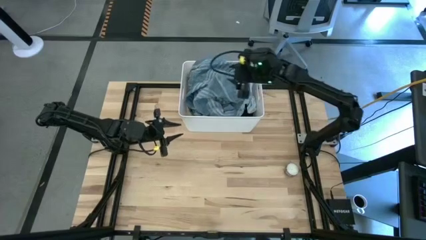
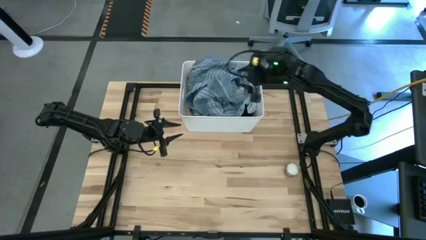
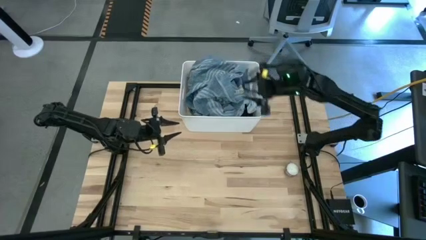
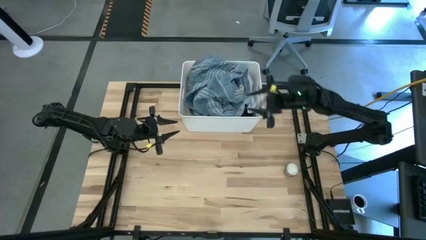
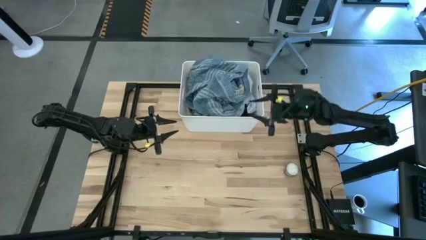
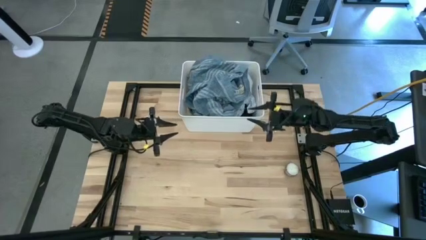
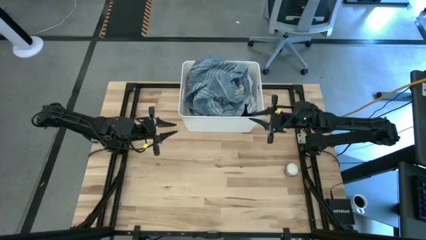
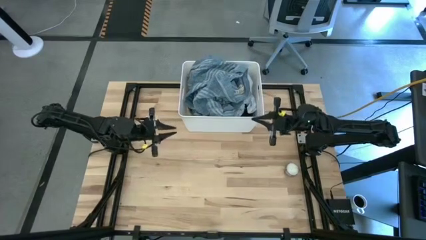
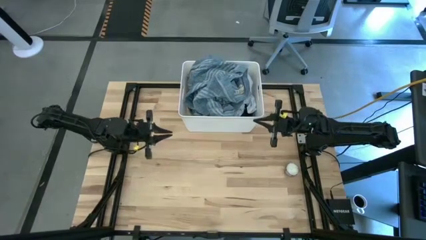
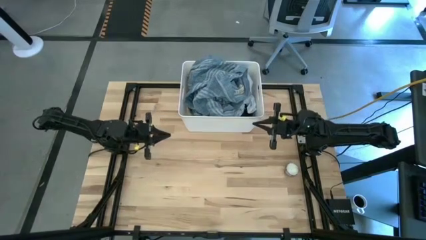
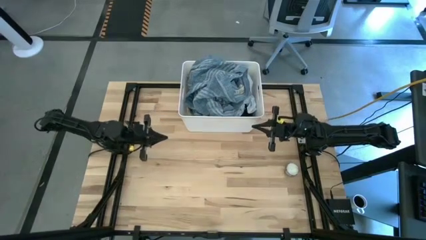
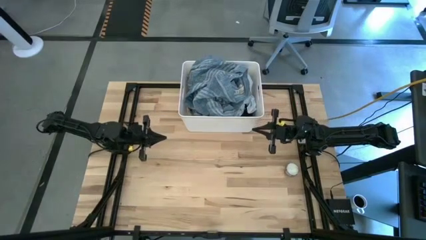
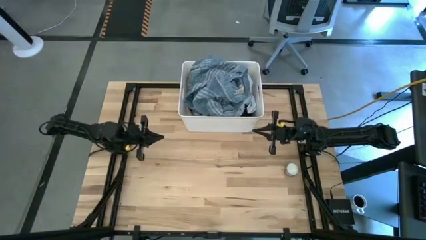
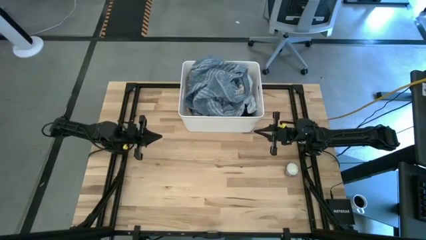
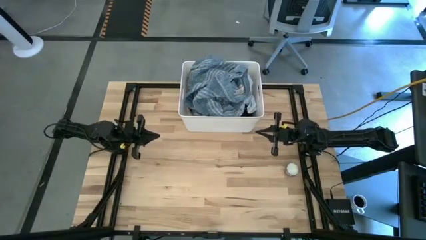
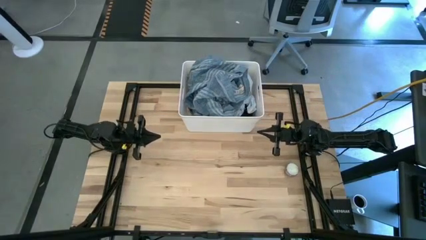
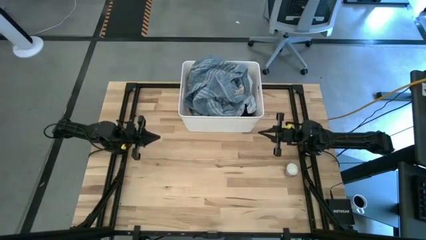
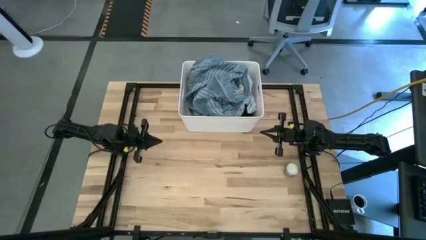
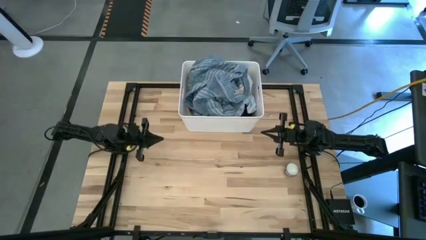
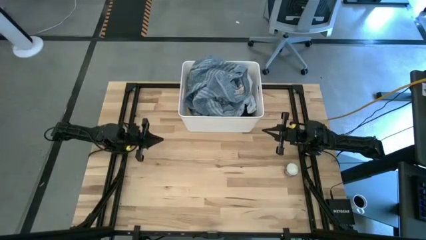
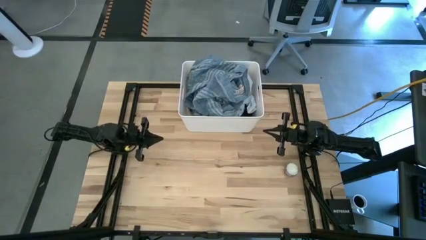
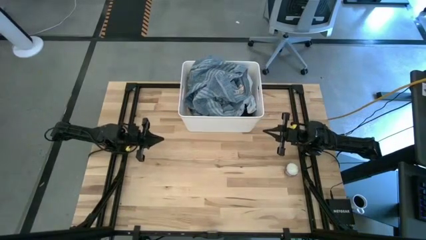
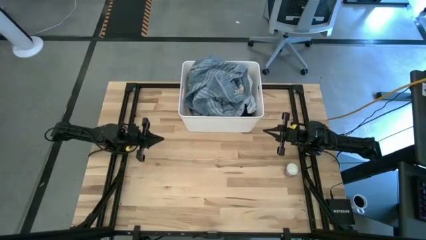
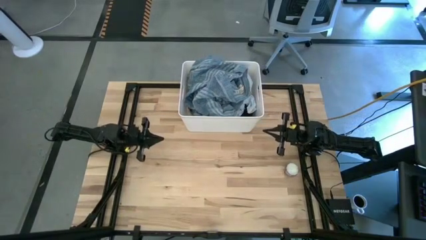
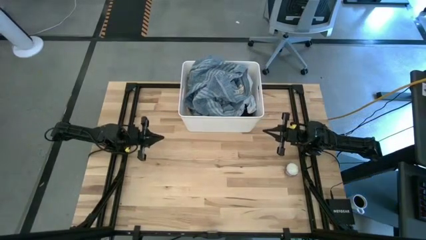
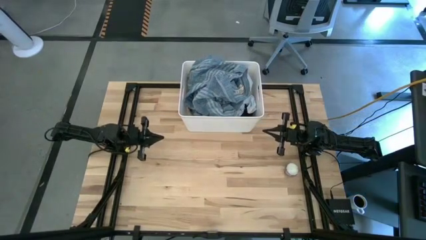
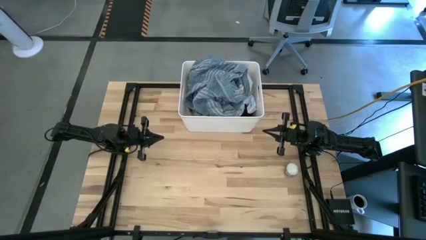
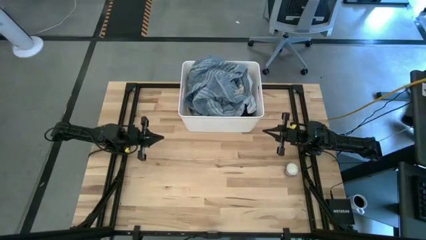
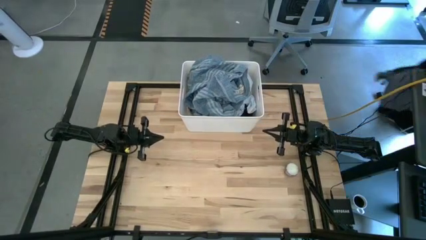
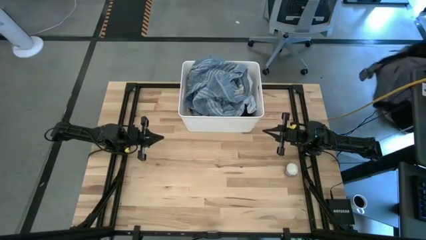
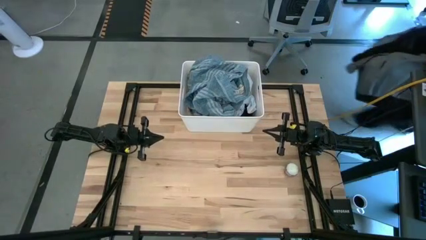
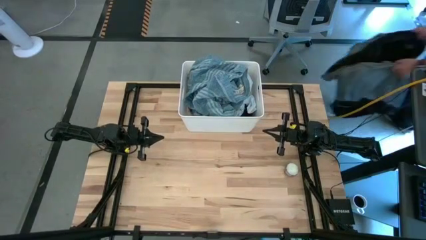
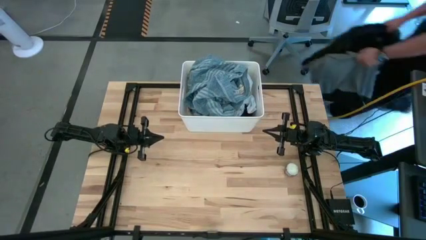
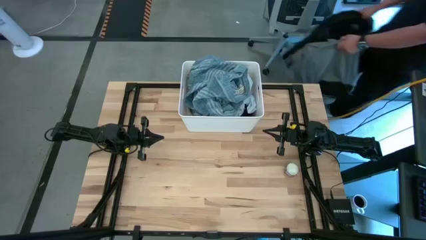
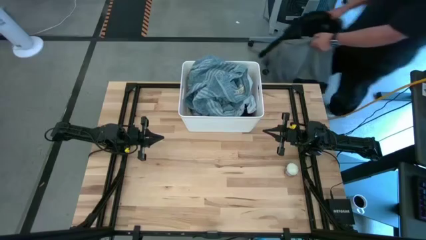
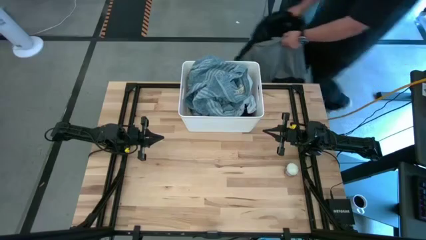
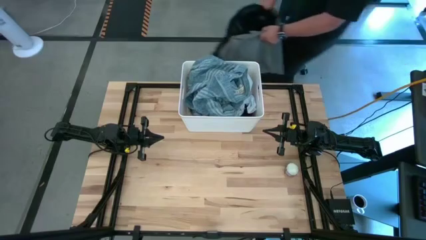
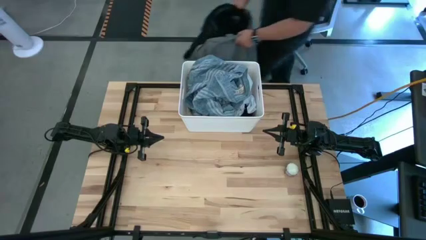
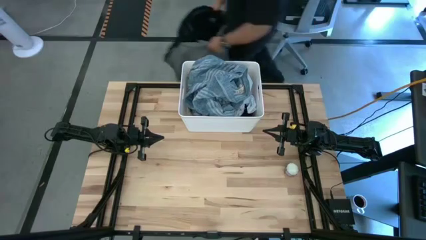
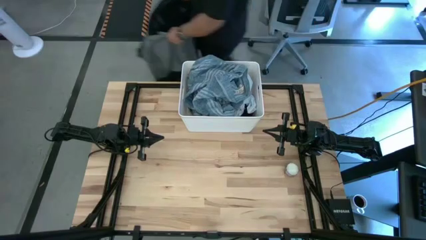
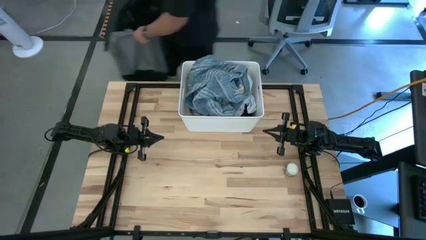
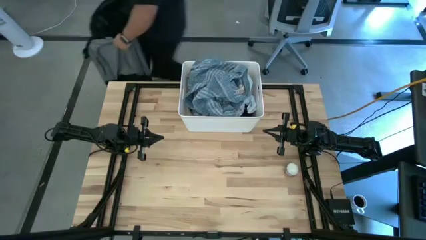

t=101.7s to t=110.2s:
Task: Sort clothes
Return to Home Position

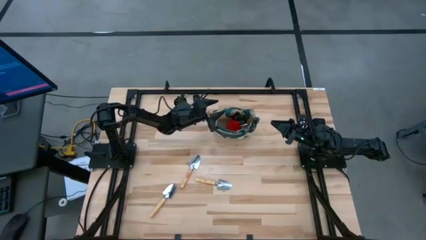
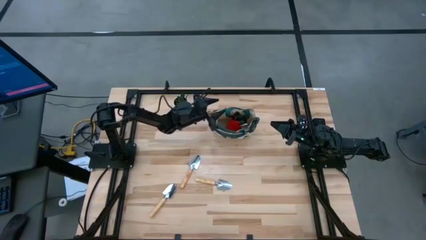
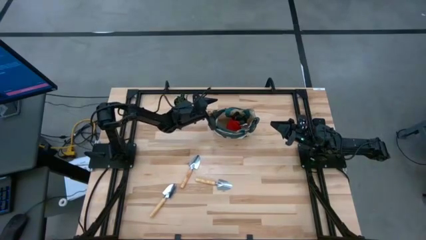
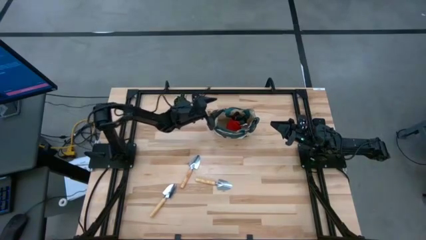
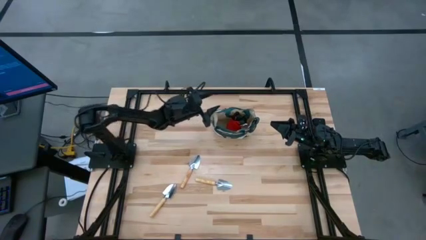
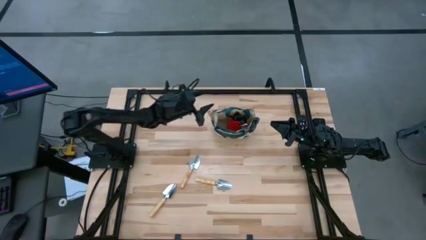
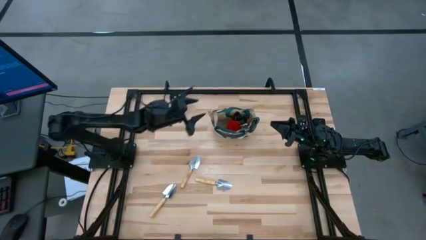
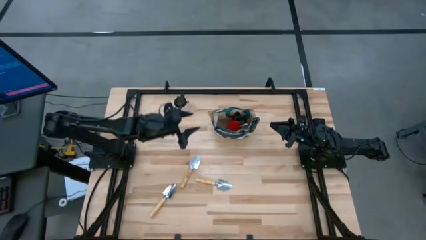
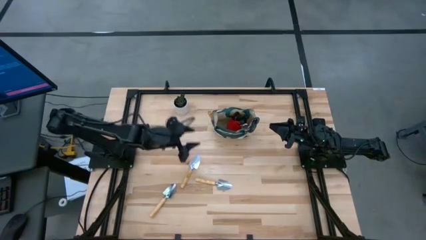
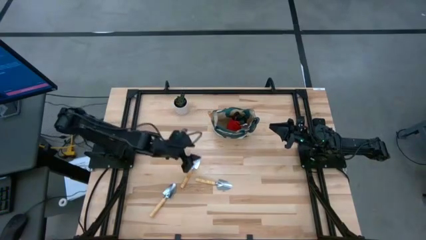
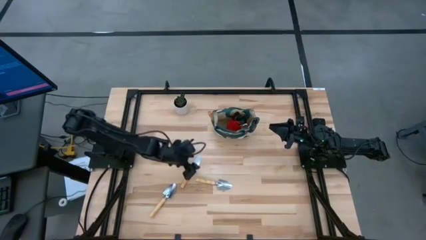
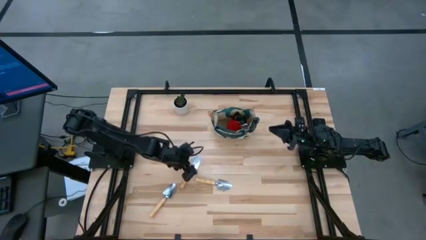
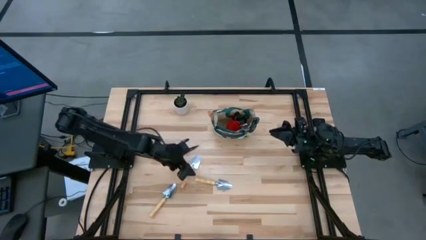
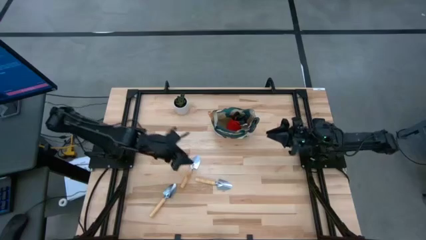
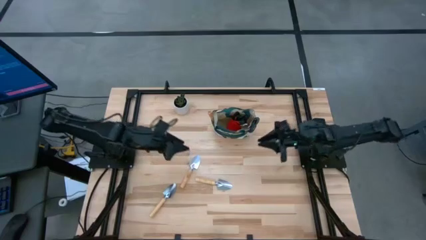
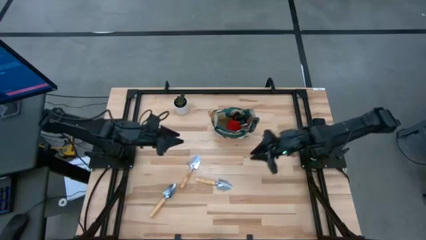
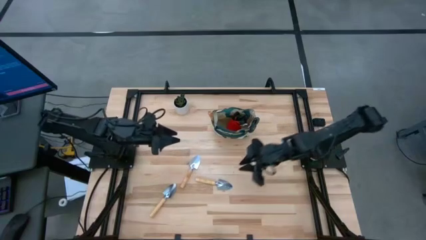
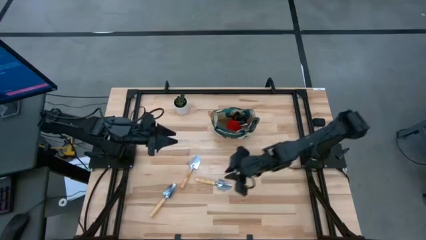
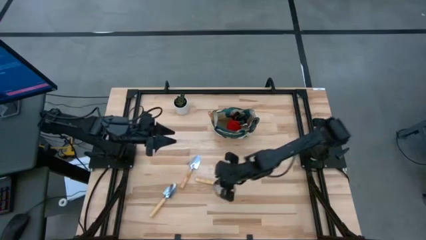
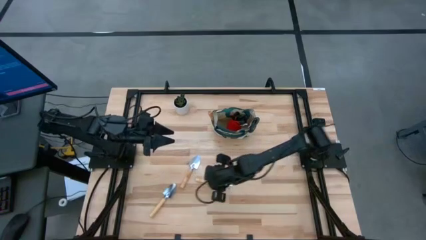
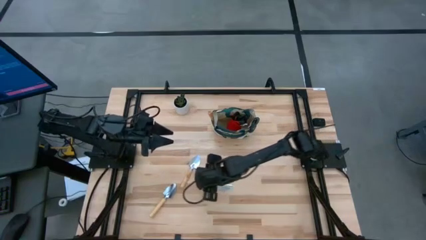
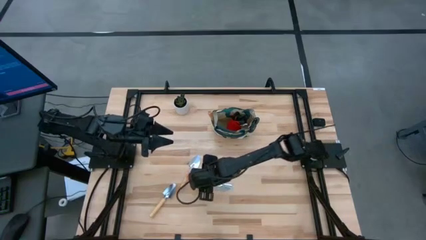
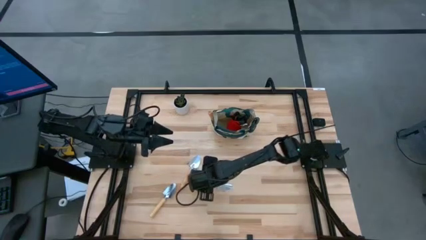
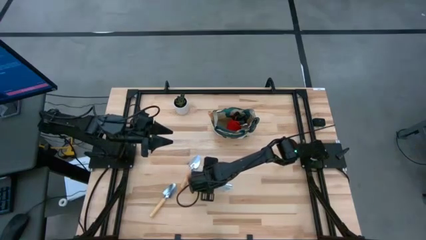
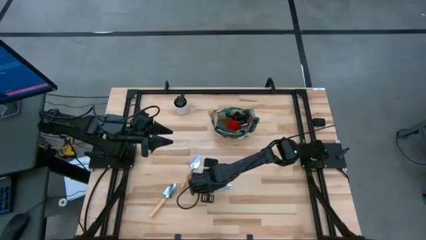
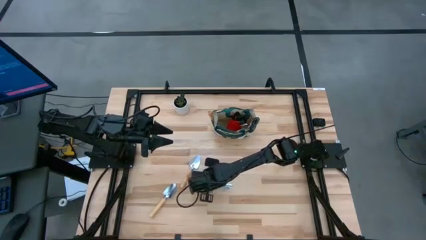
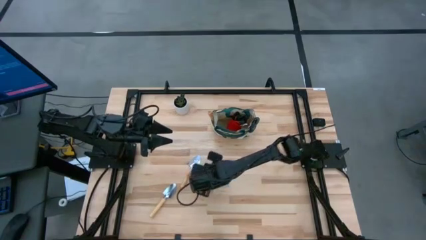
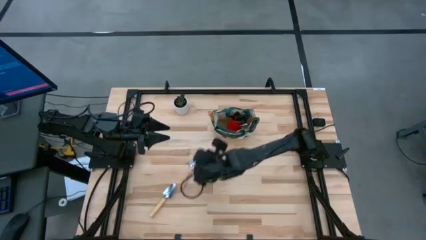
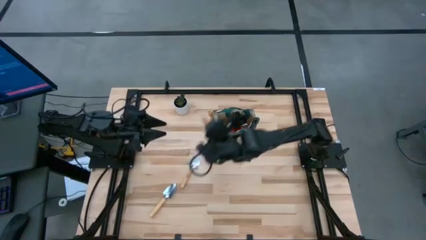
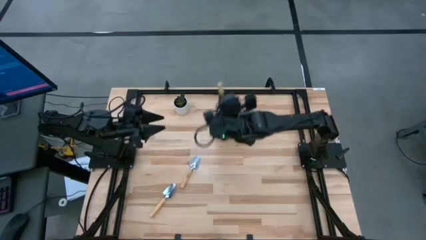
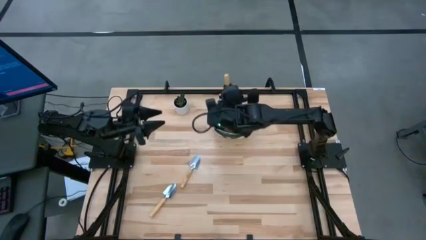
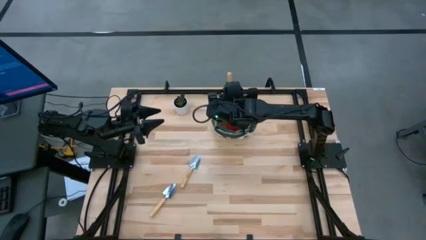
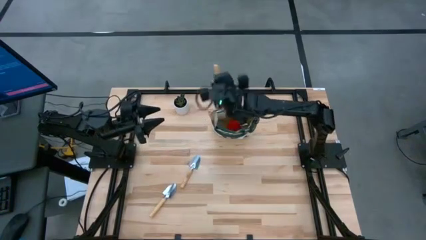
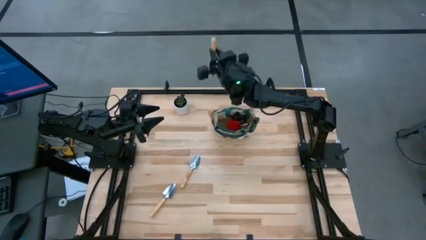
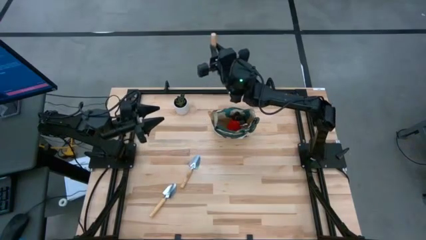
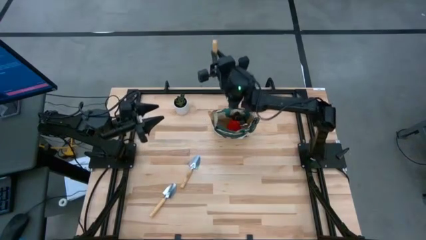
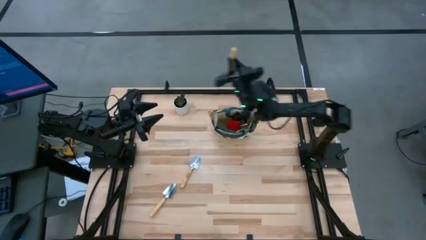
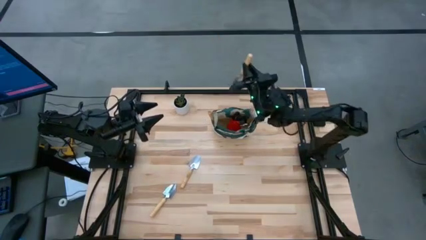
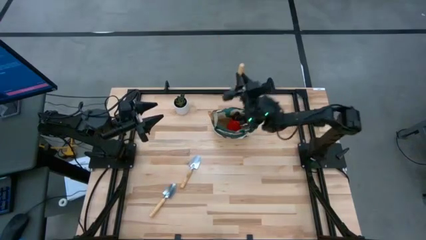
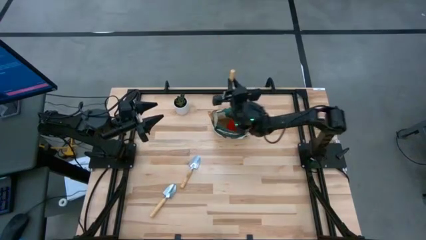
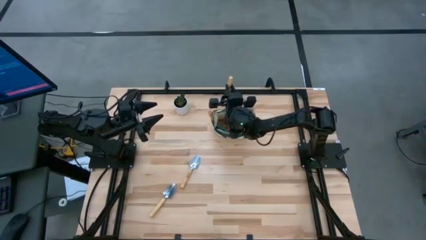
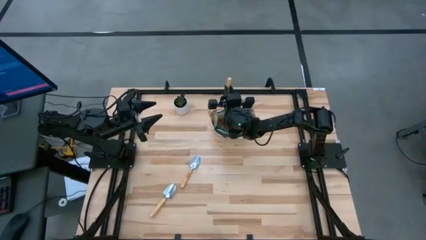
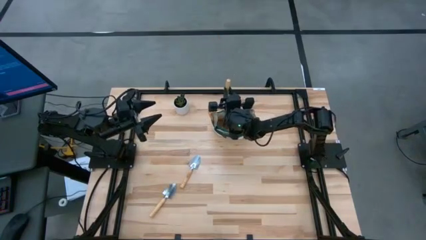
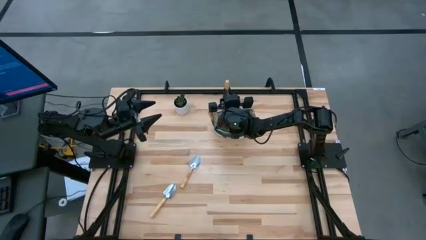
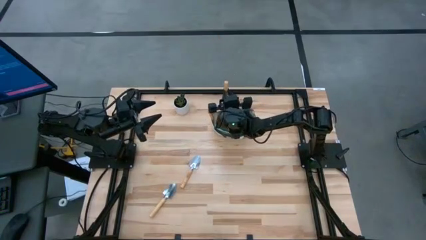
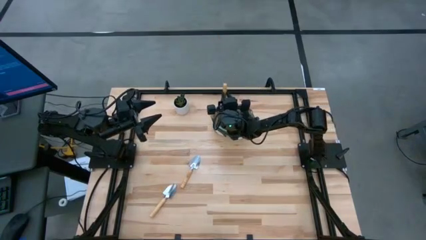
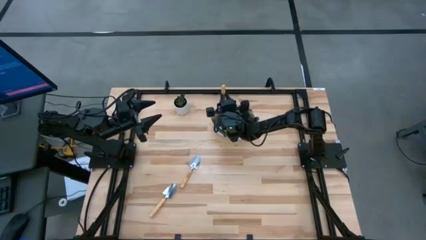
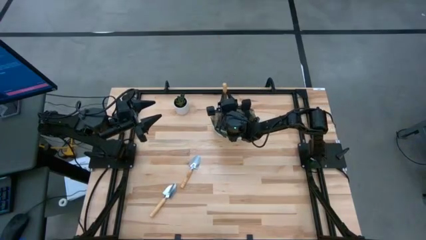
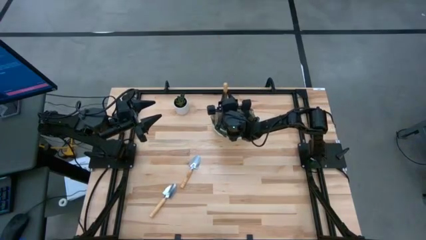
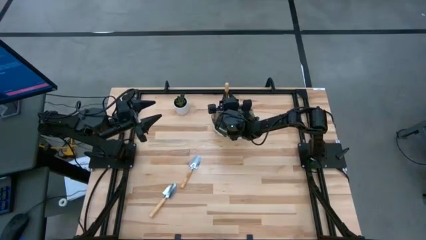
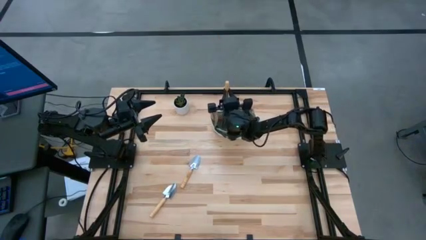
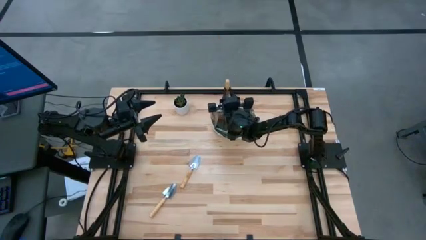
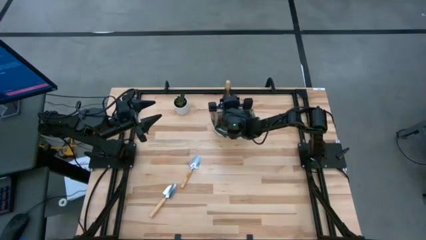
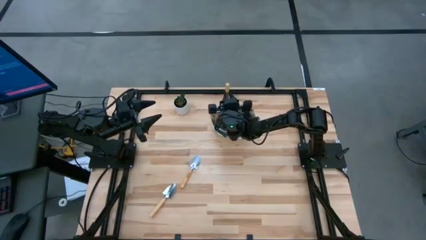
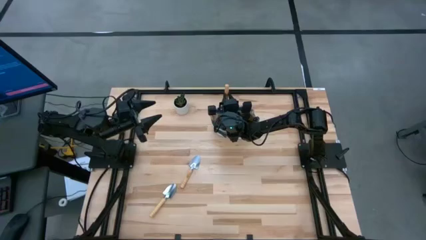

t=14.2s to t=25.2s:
Task: Pick & Place Garden tools in Gardening bag
Put the brown trowel into the gardening bag
